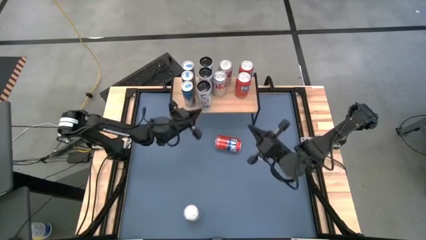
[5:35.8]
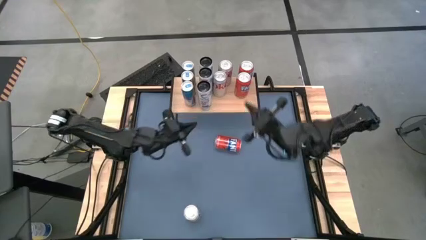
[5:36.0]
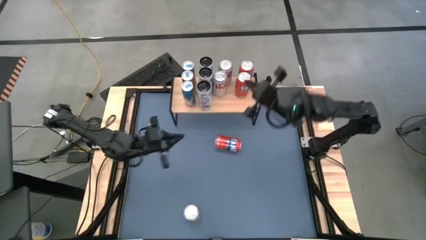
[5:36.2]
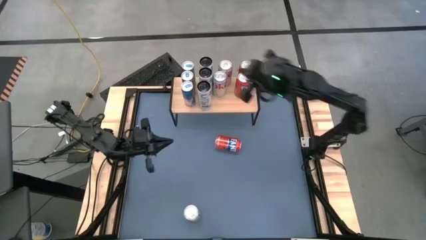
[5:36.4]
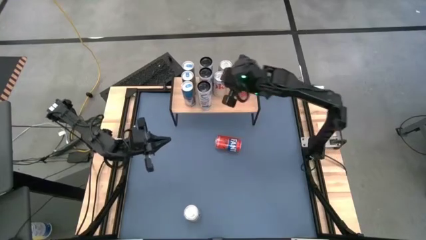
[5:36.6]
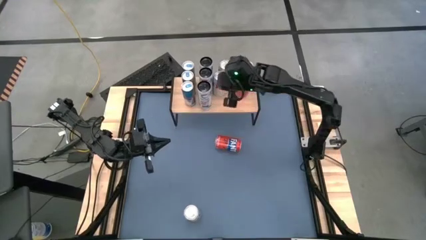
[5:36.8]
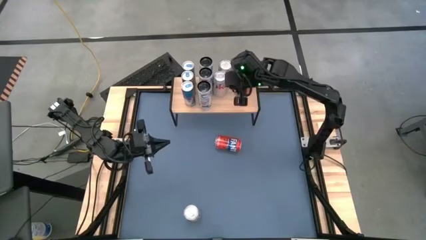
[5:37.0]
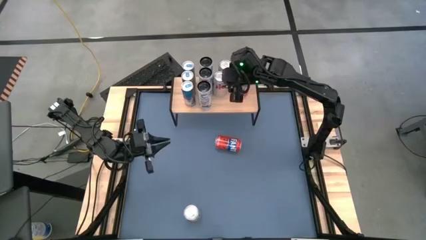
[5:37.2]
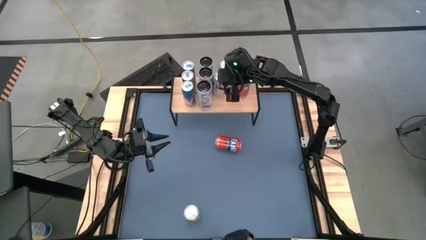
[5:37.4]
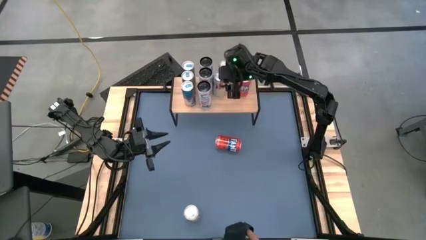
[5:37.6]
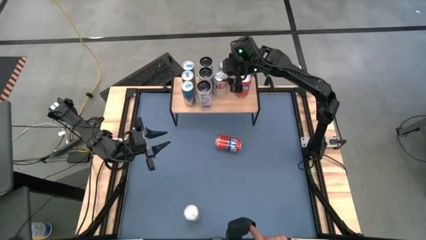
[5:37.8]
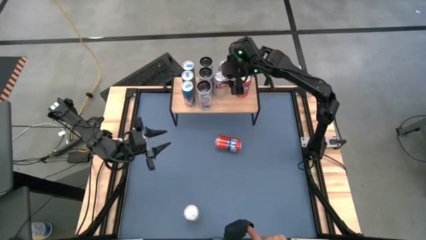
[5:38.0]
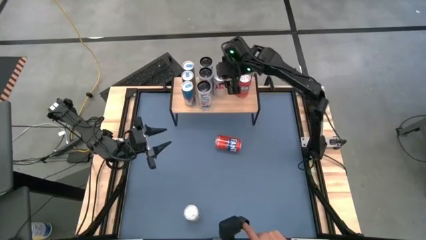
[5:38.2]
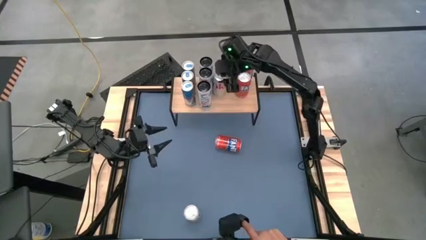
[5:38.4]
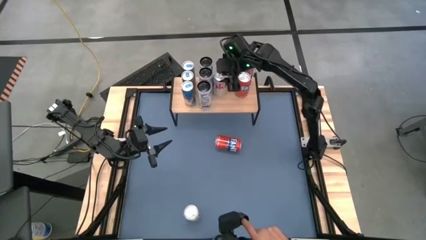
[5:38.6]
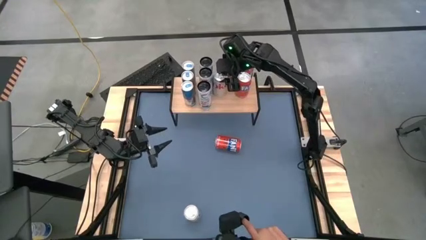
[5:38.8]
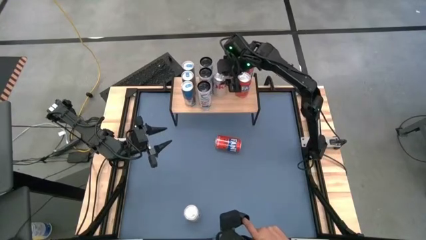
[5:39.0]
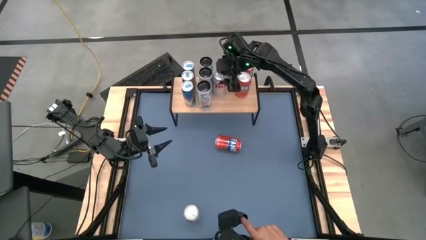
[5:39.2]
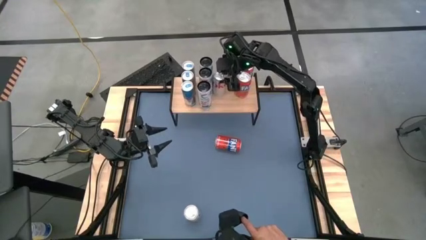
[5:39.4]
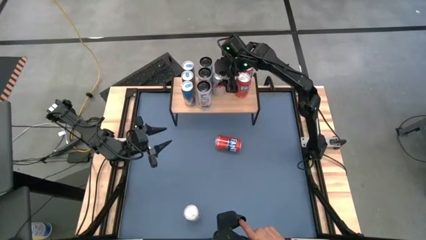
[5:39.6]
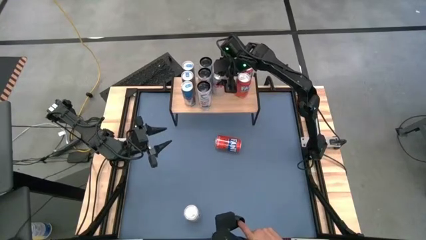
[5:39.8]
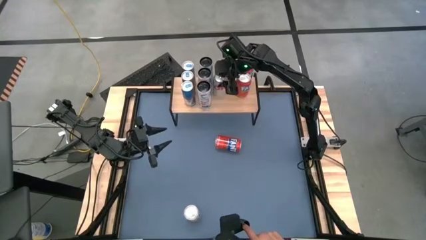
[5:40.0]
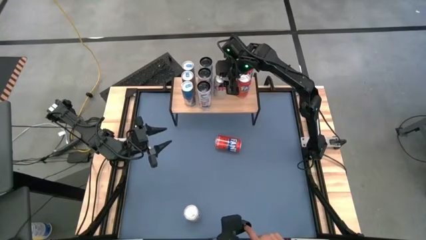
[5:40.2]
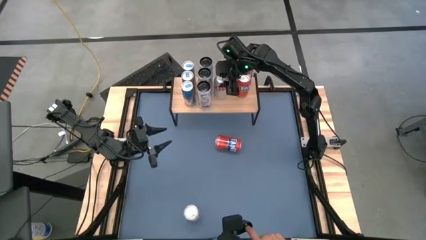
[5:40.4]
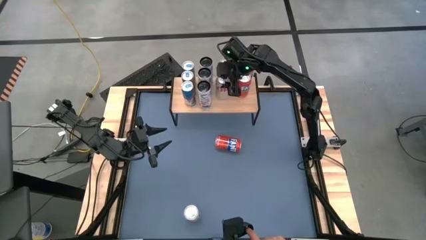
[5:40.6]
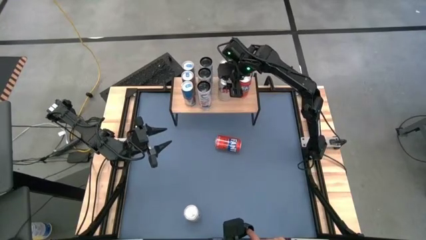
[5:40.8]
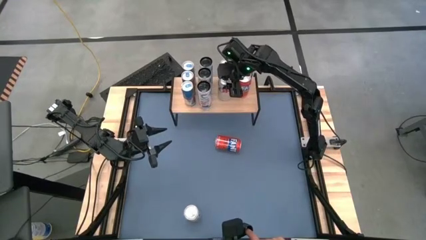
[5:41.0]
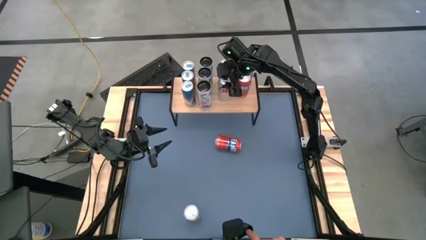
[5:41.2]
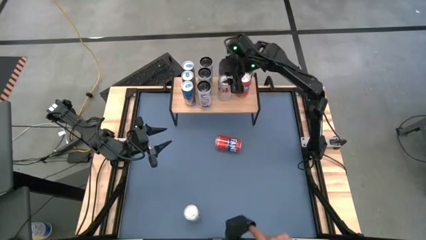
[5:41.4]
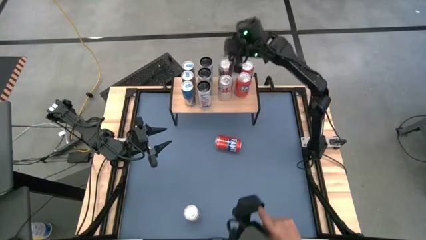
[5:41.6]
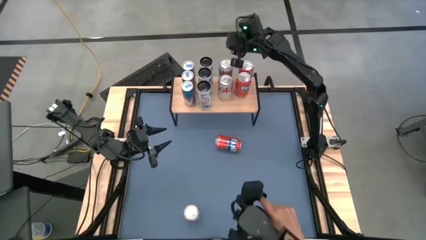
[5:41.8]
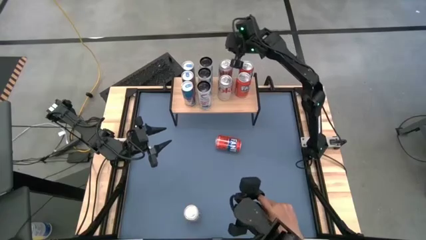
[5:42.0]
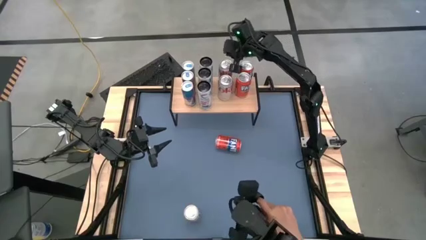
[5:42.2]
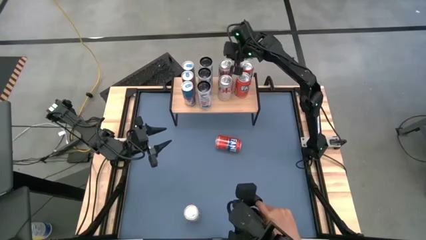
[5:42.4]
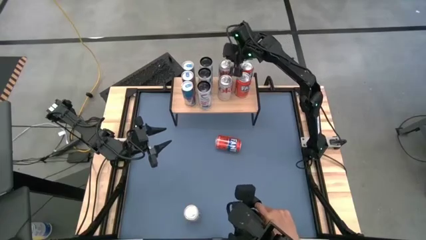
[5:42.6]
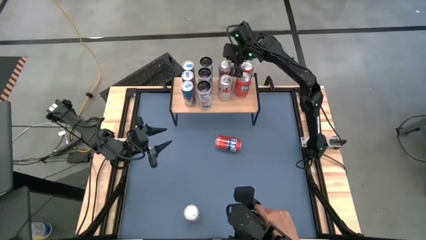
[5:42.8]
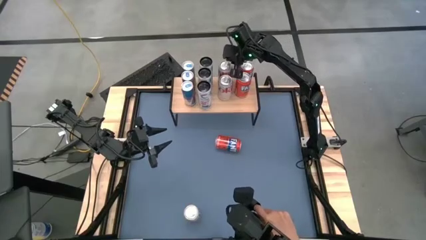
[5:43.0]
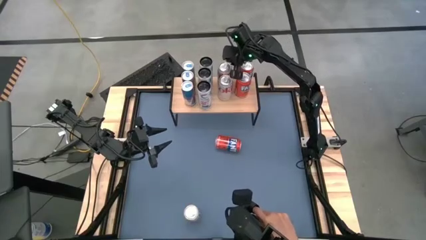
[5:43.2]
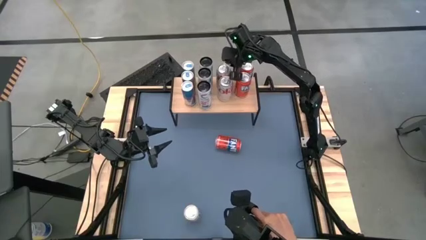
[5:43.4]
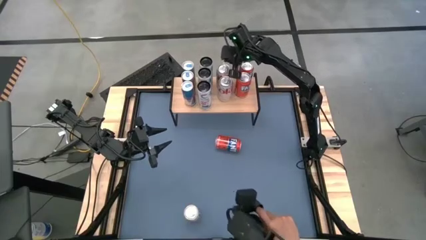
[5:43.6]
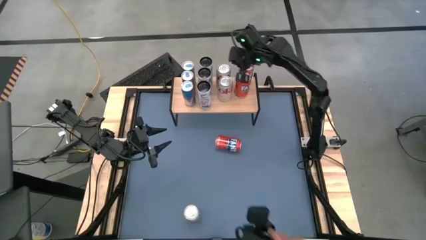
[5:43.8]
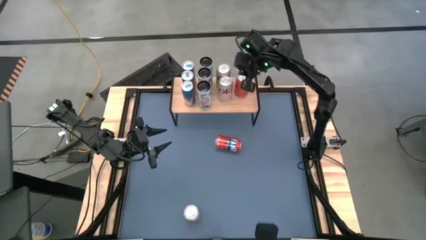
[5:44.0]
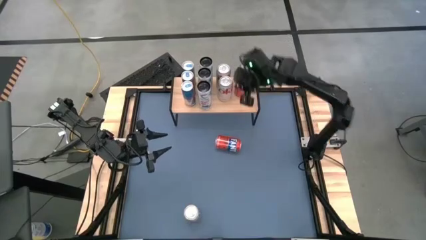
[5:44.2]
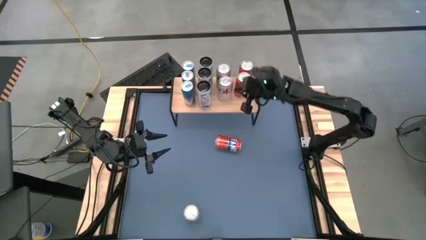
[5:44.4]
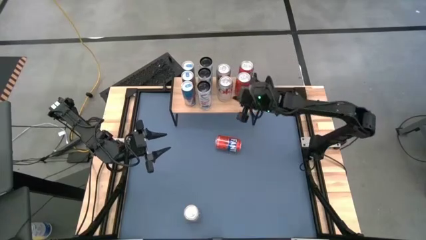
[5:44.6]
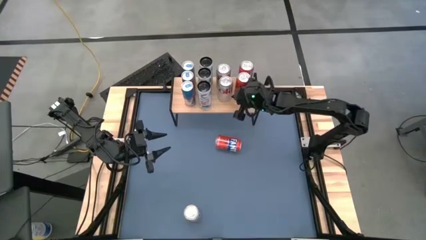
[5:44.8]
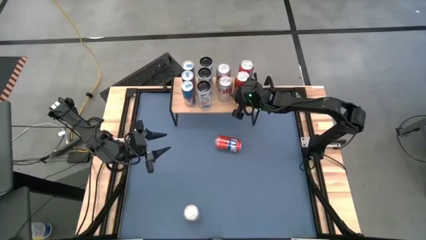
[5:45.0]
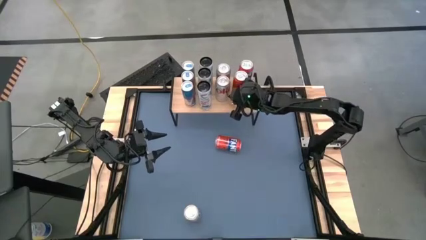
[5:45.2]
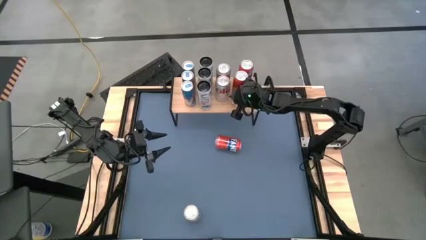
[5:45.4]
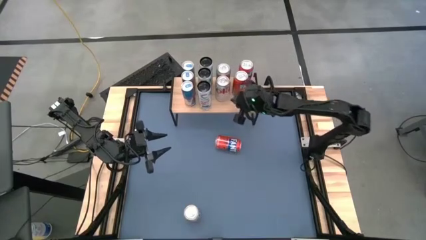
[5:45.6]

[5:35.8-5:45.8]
Task: Place canned beverage on shelf
Adjust the silver soda can
